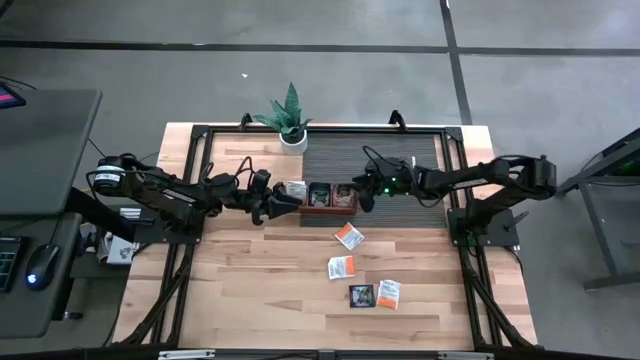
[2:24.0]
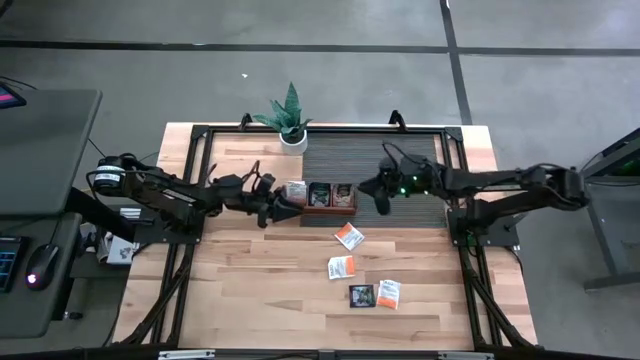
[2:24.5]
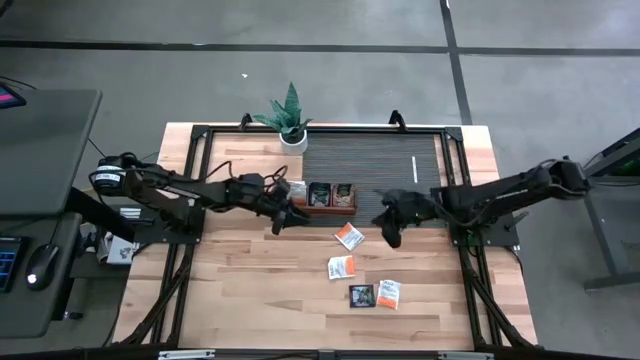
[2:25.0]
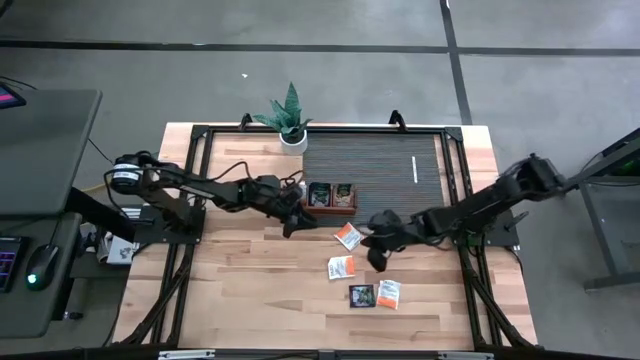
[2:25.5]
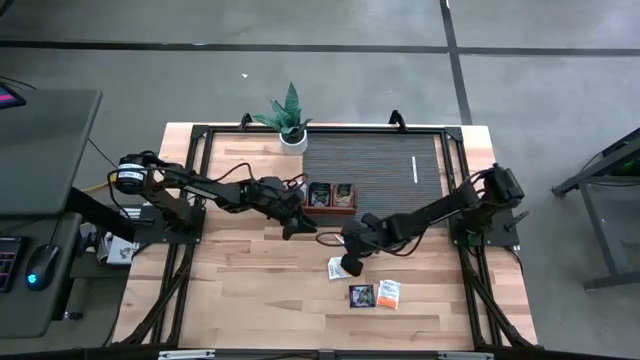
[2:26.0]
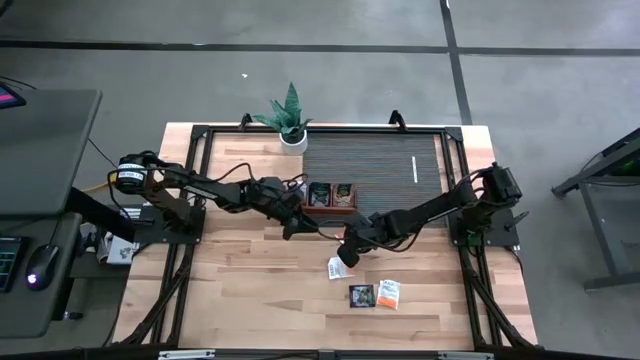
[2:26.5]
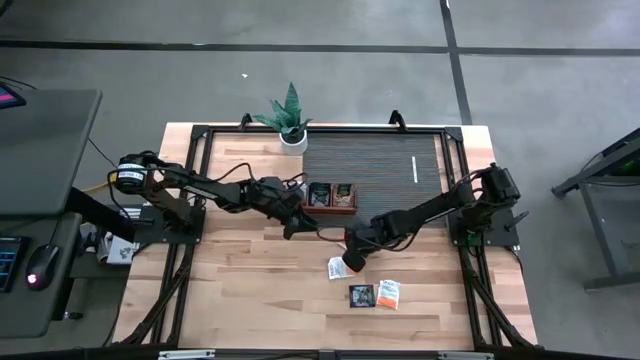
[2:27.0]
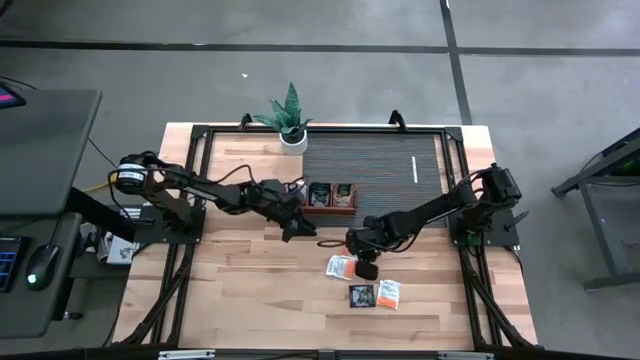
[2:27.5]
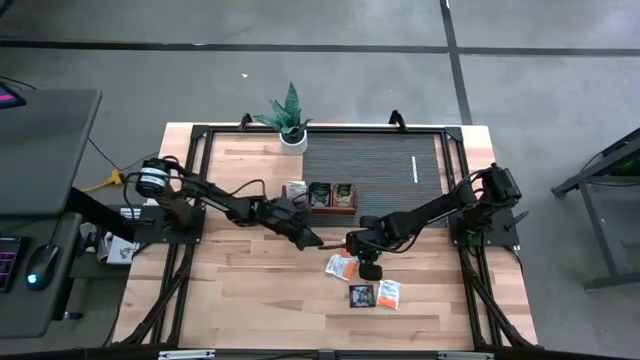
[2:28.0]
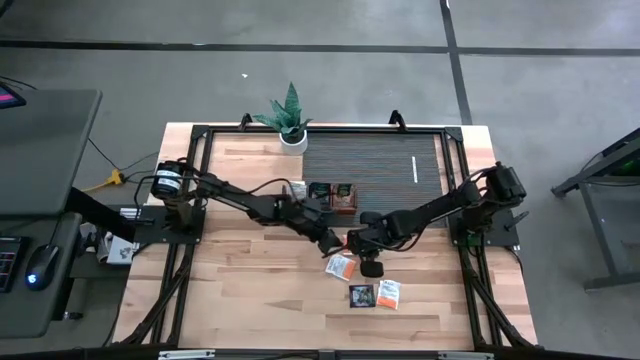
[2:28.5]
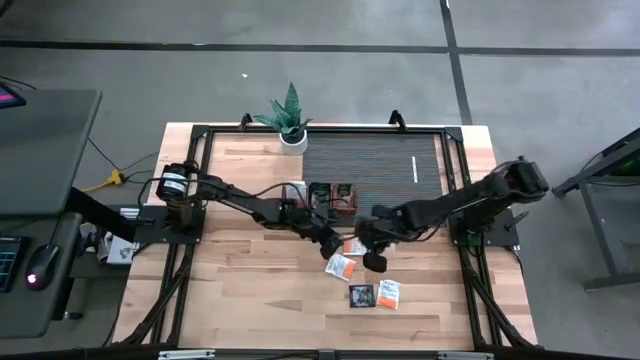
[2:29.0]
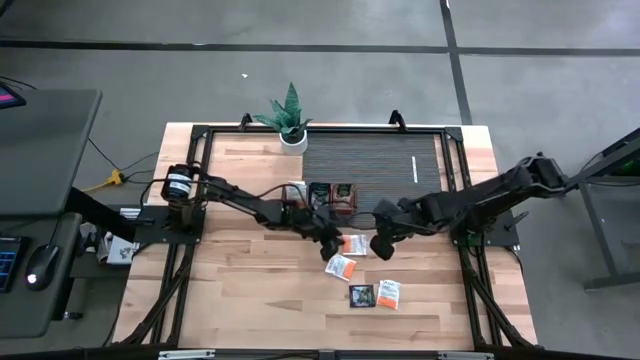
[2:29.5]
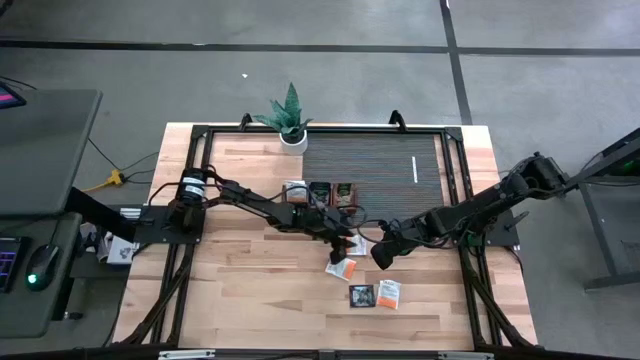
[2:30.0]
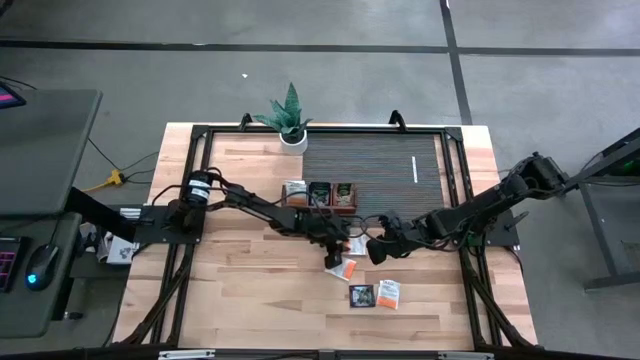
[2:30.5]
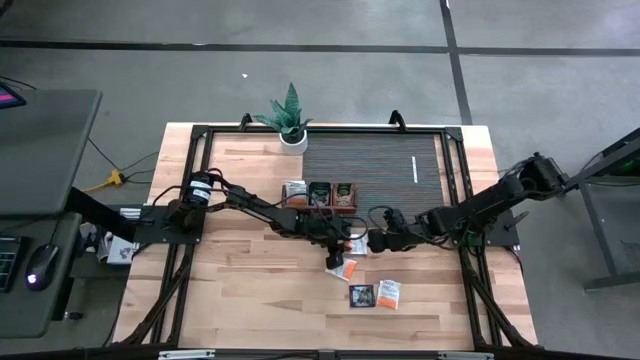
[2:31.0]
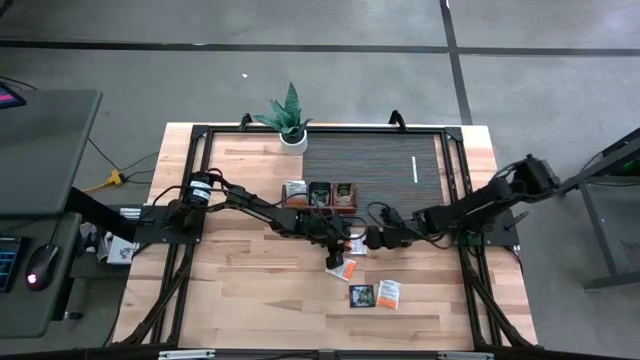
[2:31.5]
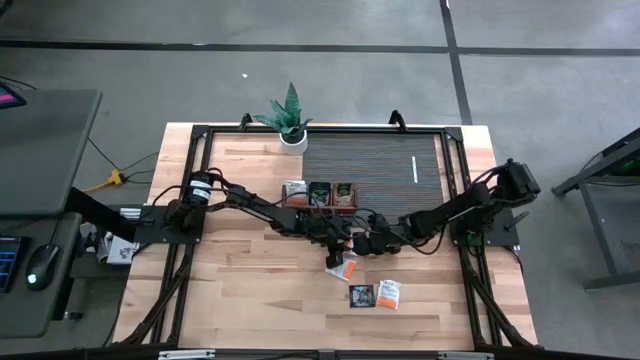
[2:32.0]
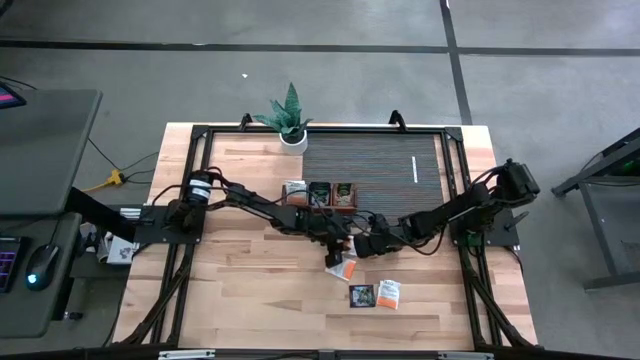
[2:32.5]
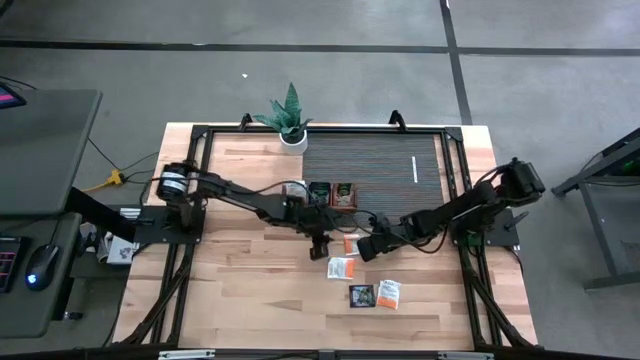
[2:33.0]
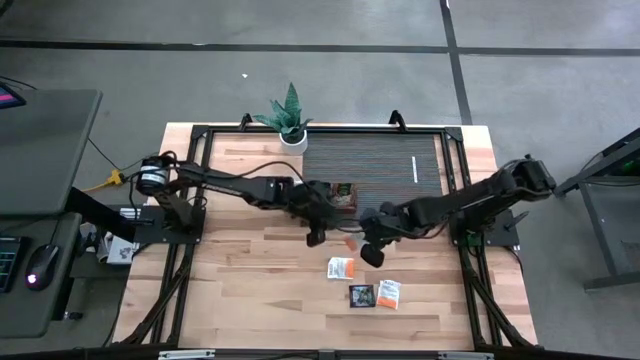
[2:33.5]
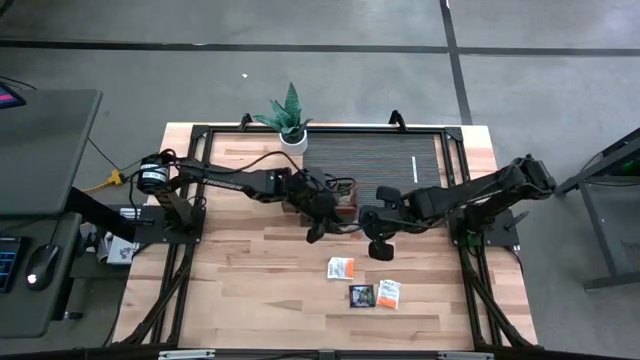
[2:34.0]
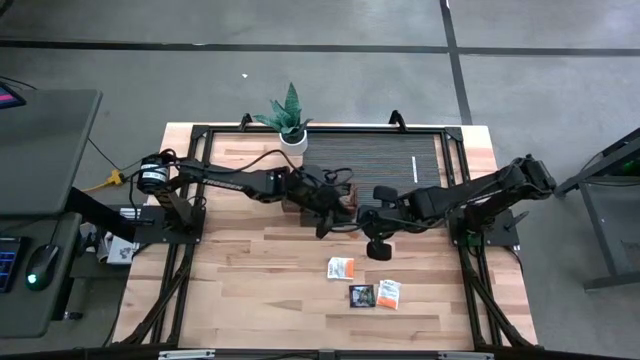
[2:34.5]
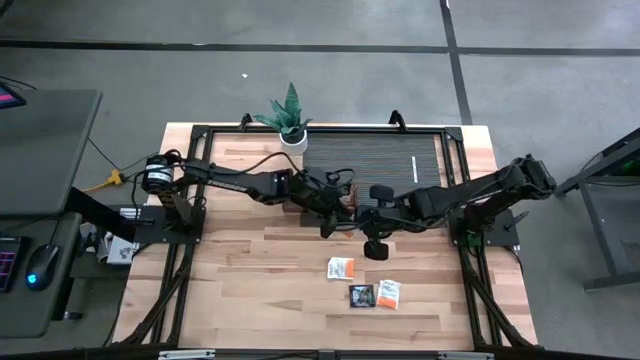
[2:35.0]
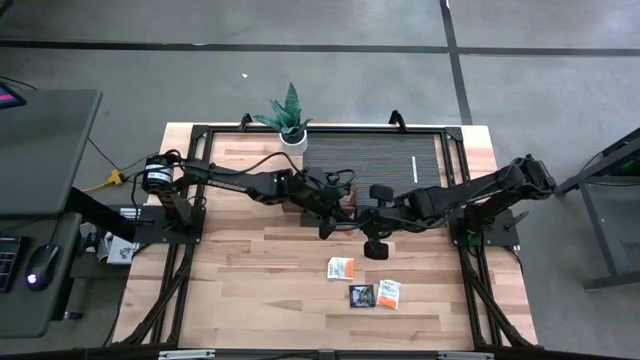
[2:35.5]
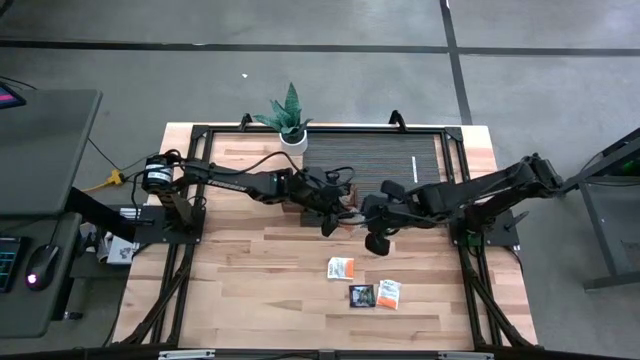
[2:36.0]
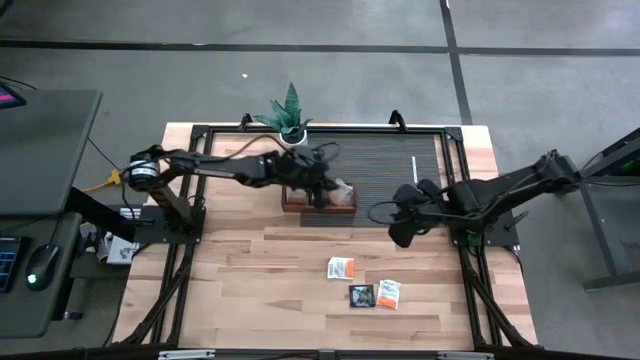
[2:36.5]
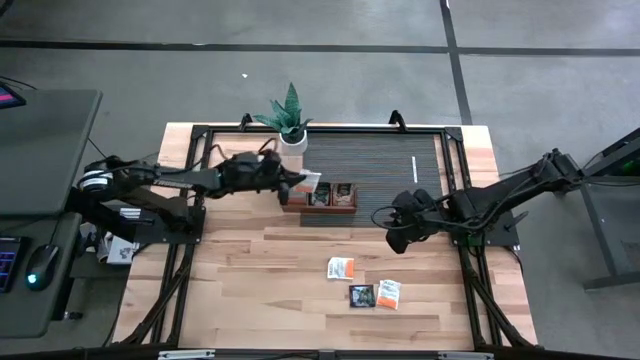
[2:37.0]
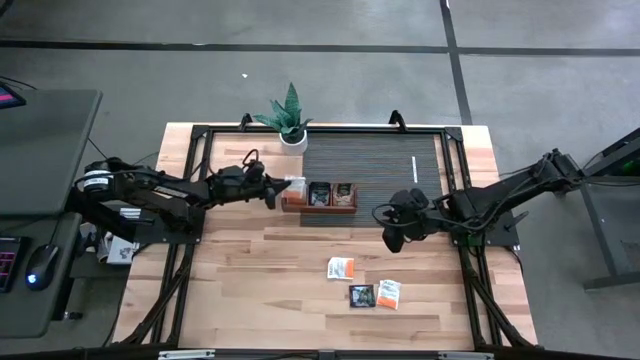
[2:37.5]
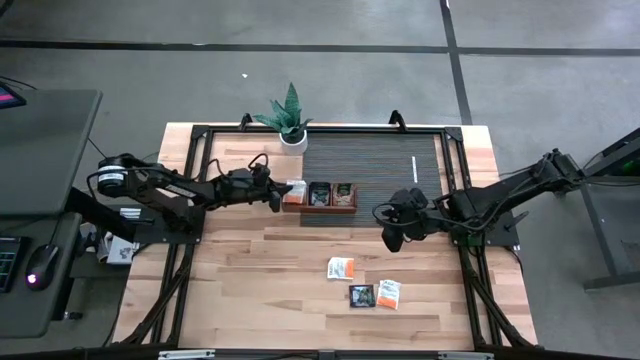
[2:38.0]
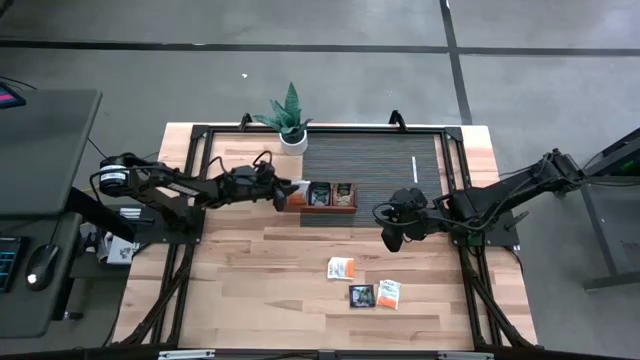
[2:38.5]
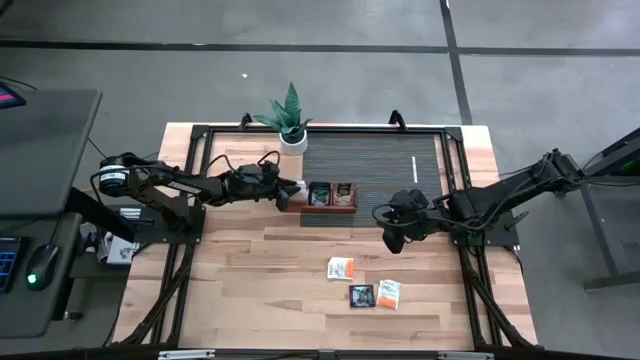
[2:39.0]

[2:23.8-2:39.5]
Task: Pick & Place Tea
Put the orange tea bag into the left section of the wooden organizer

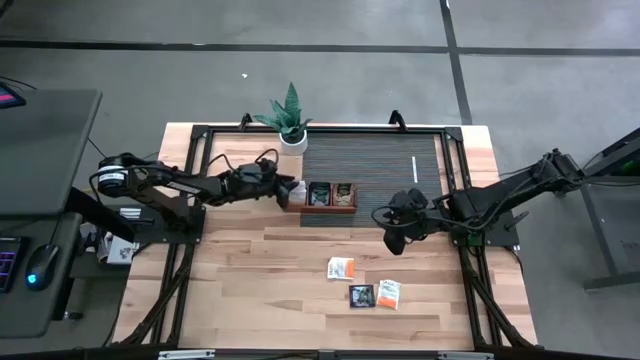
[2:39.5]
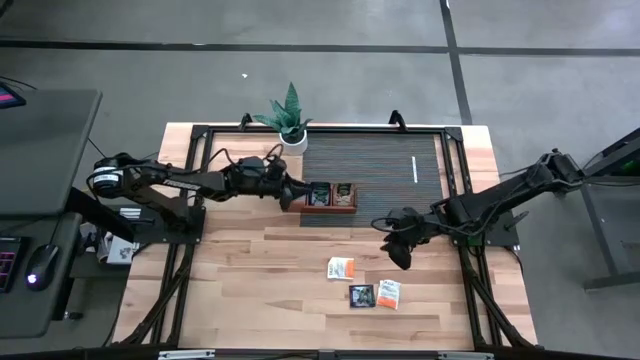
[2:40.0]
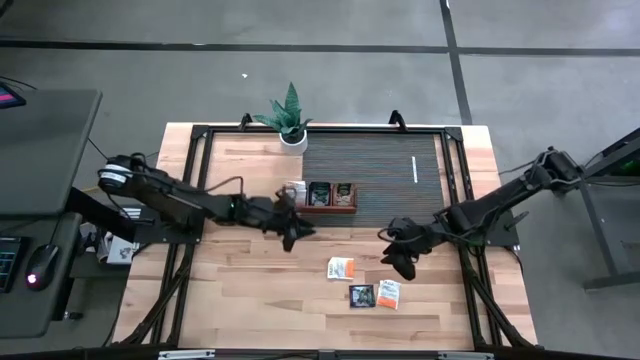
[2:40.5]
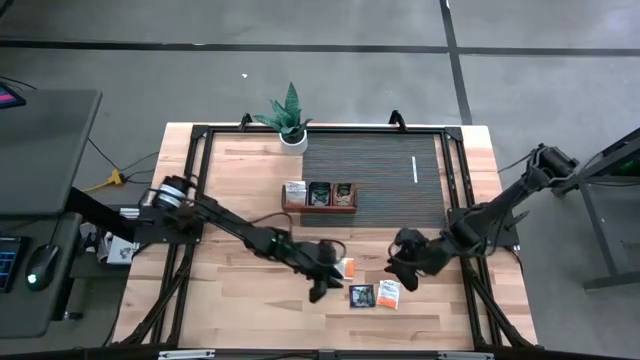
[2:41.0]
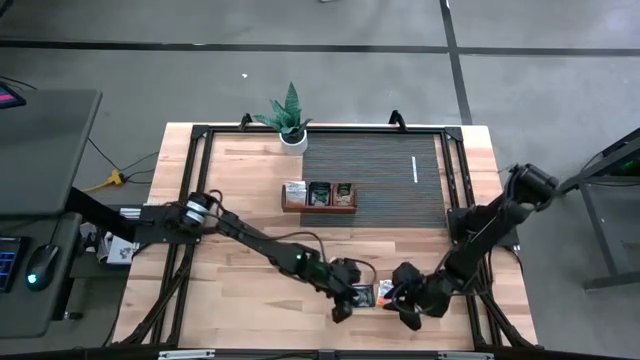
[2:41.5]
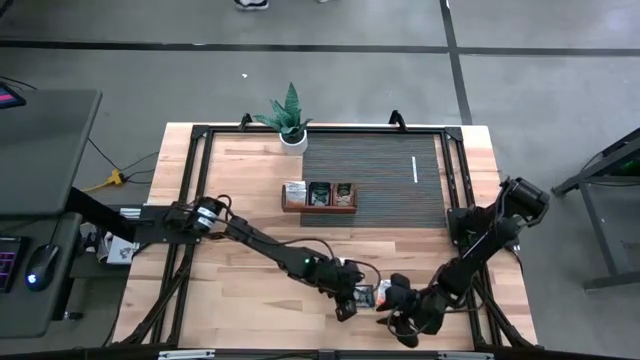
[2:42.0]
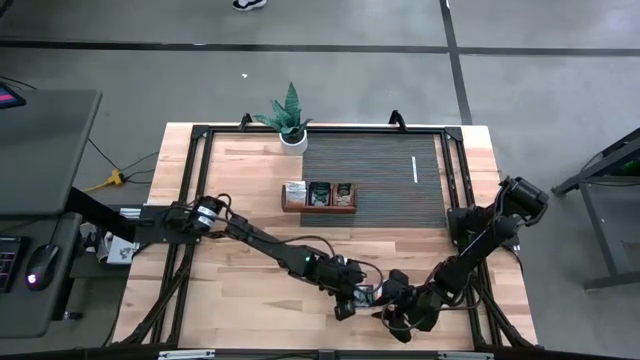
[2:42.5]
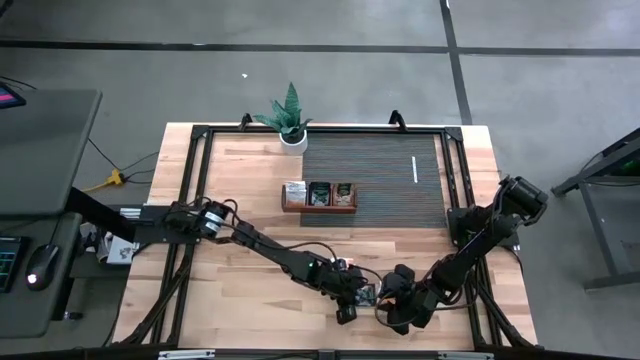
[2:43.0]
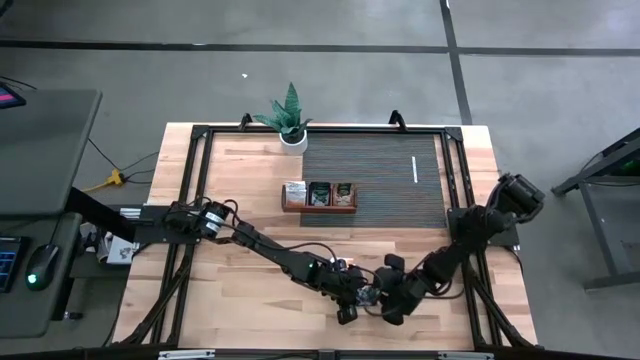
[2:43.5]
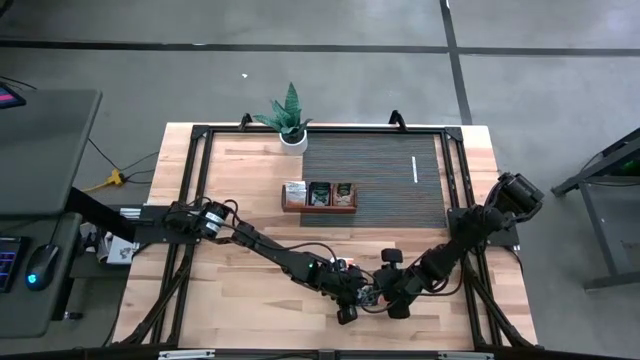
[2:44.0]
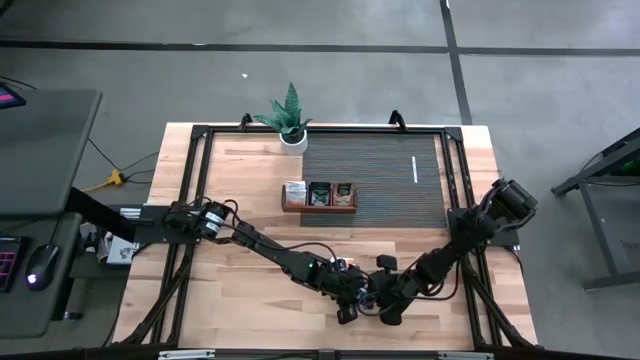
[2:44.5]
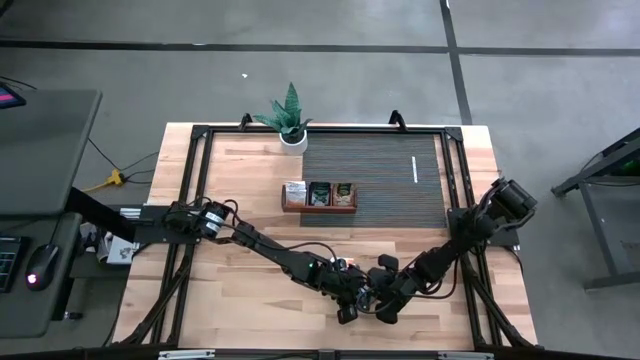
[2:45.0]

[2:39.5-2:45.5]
Put the blue tea bag into the middle section of the wooden organizer
